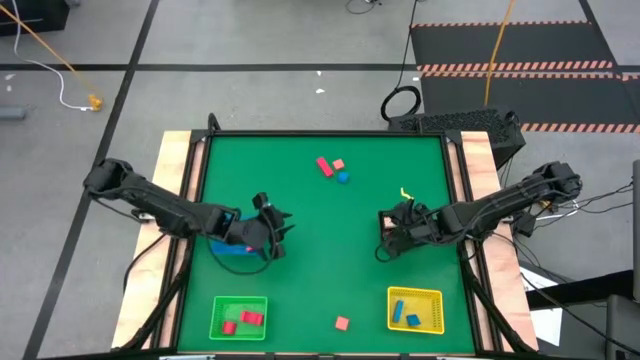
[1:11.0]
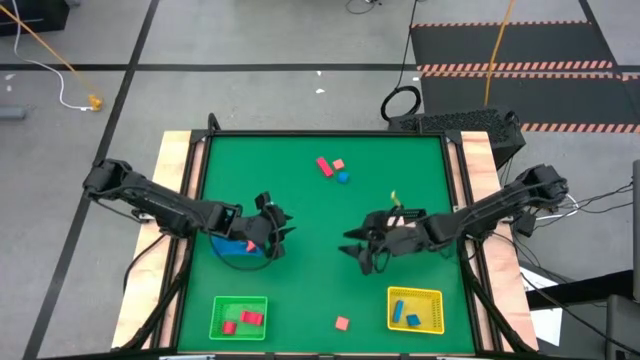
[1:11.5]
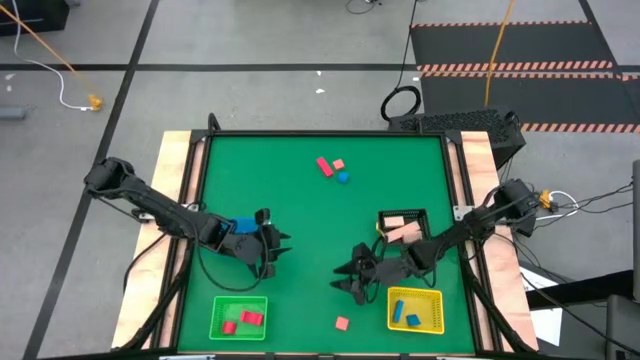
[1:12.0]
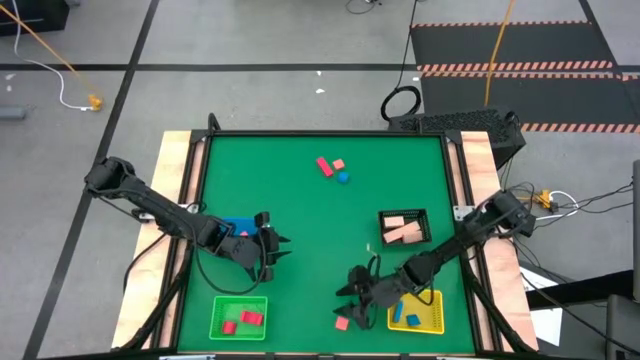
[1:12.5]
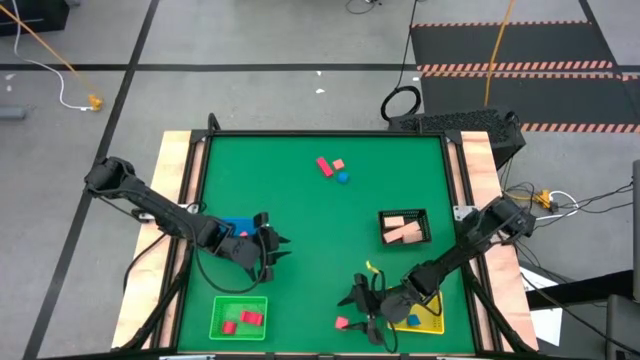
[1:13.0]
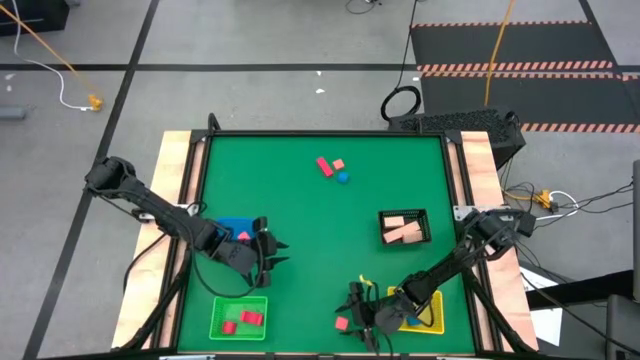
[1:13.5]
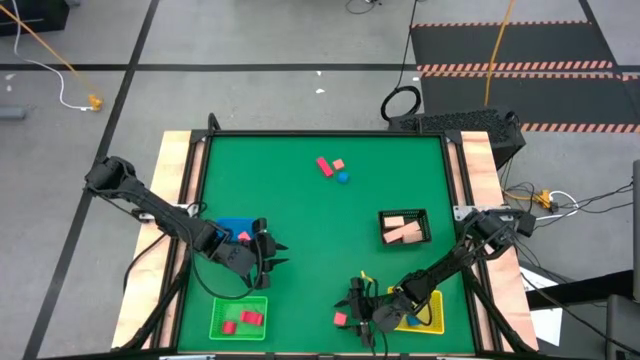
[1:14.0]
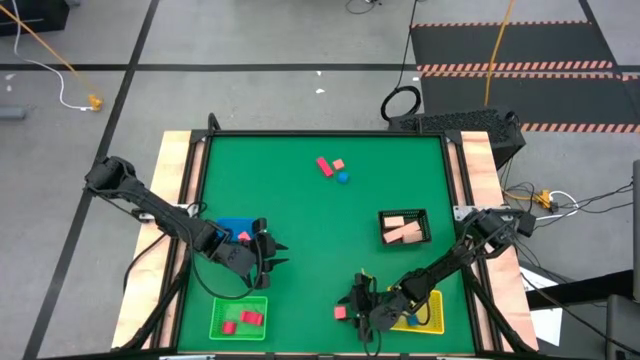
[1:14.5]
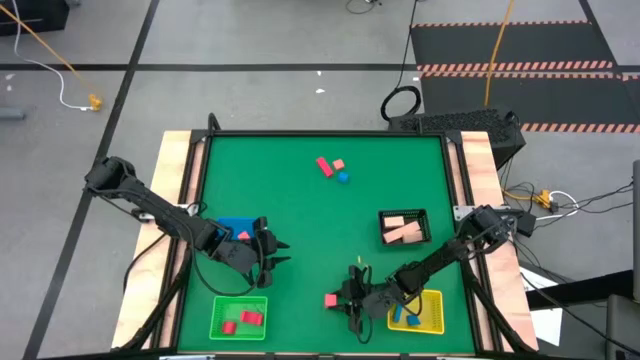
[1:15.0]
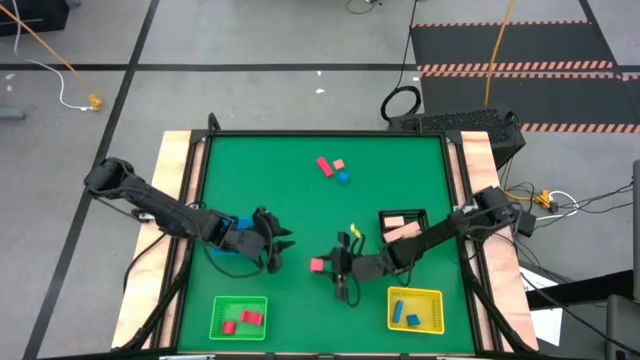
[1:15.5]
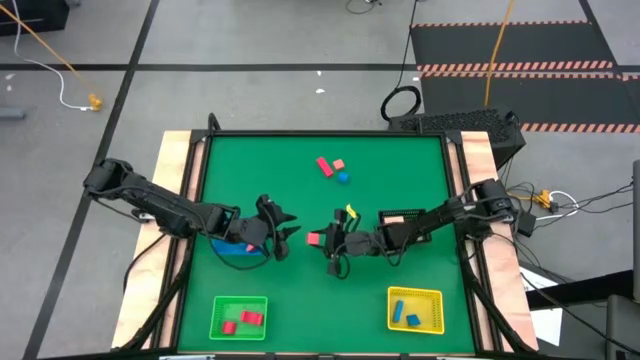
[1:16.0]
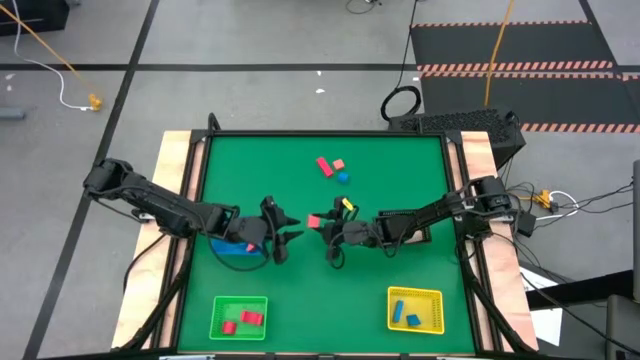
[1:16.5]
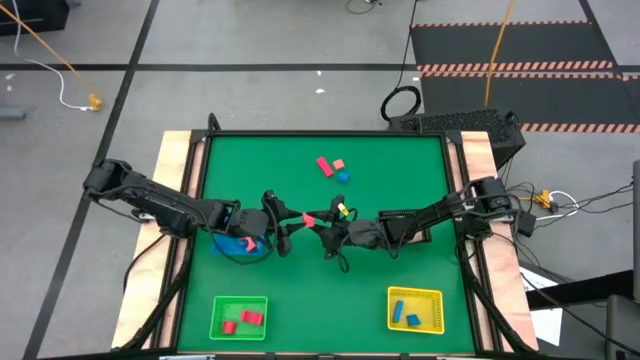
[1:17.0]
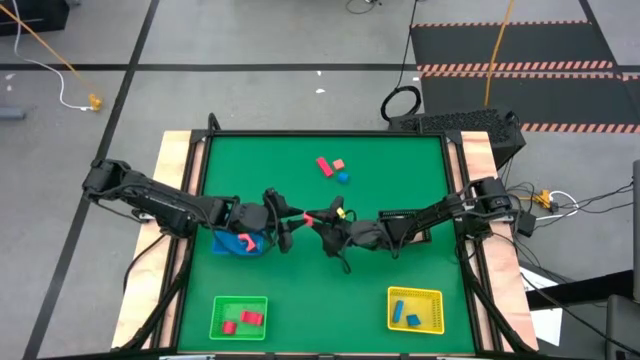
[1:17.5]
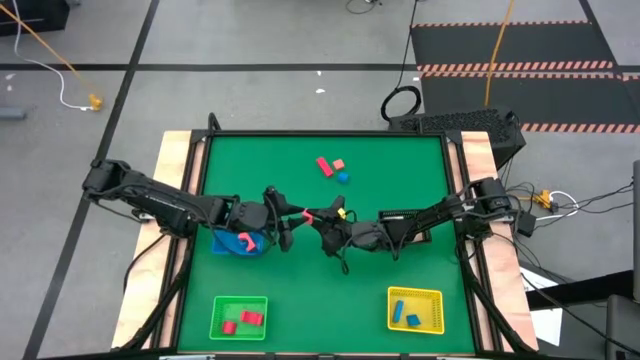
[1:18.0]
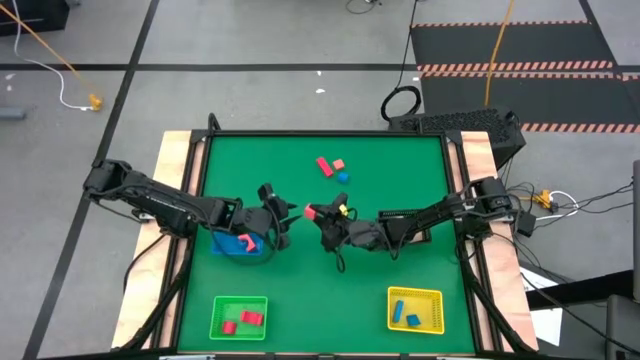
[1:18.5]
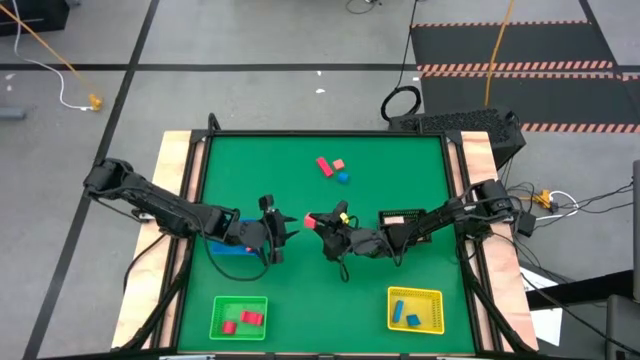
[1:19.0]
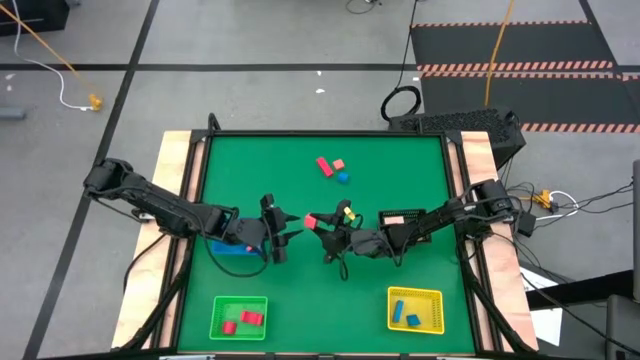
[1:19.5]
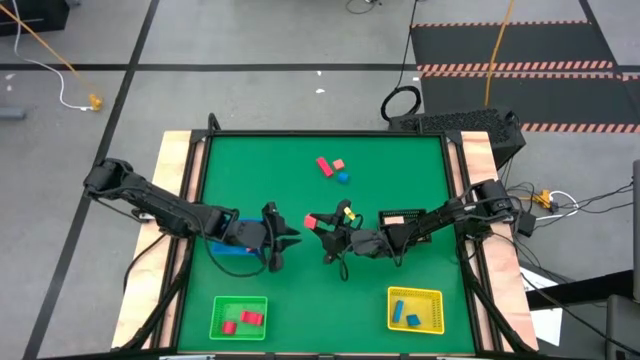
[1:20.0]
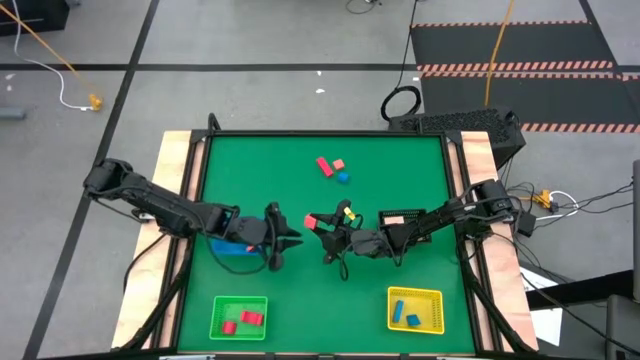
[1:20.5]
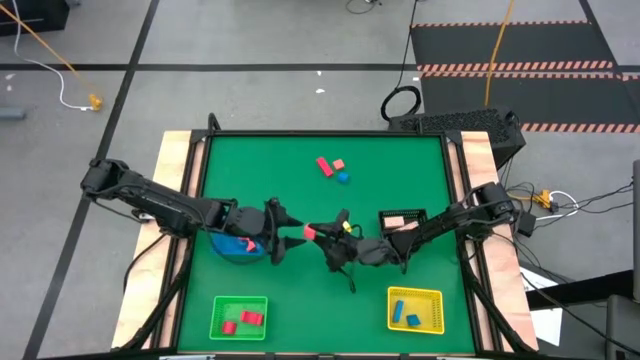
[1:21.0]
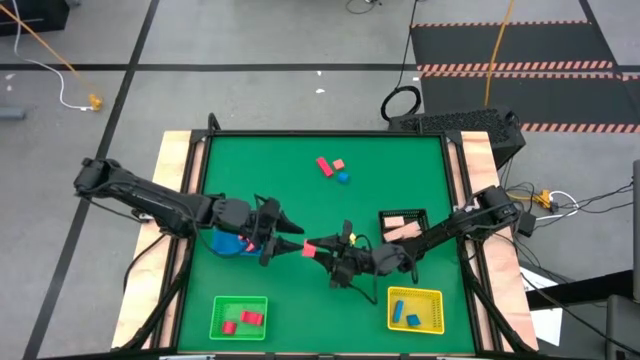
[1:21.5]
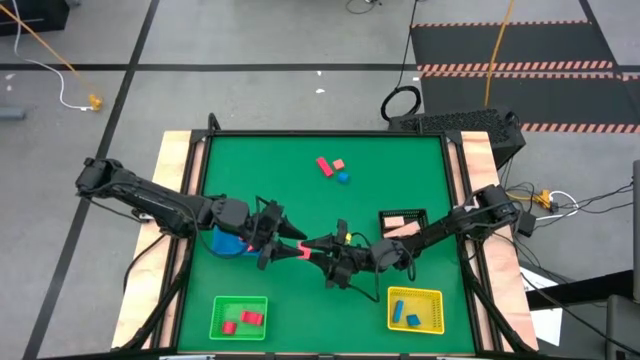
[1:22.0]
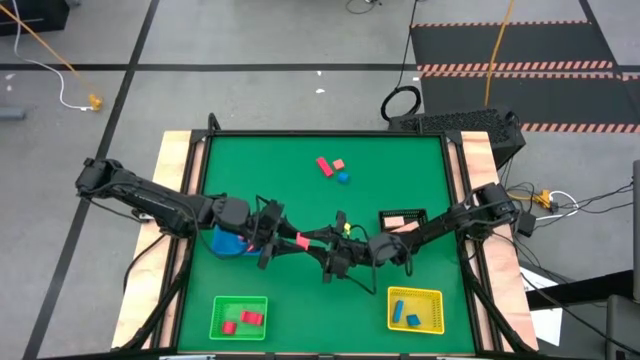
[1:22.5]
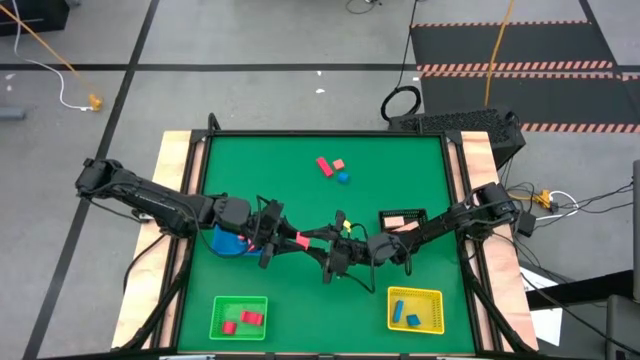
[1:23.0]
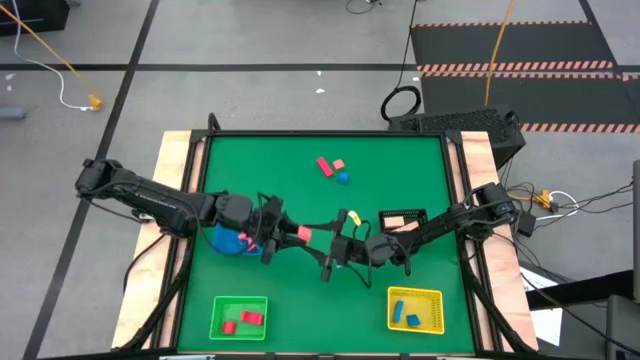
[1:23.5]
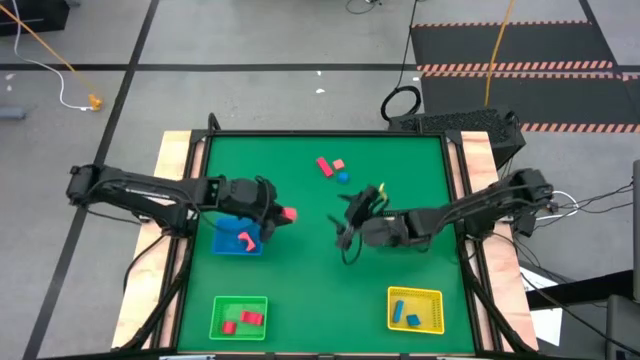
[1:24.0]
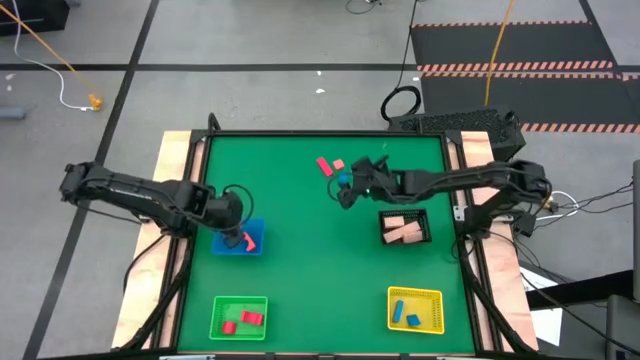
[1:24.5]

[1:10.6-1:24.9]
Task: Sort & place blocks by color
Put the bottom orange block into the blue bin

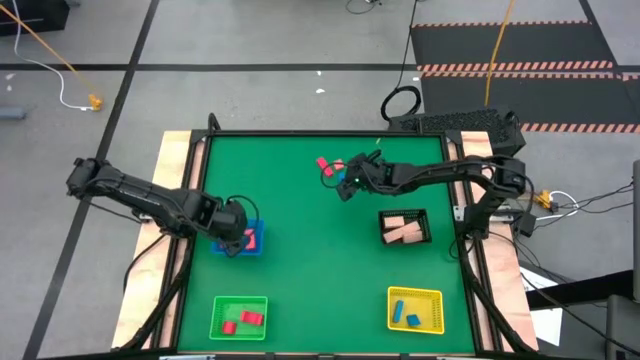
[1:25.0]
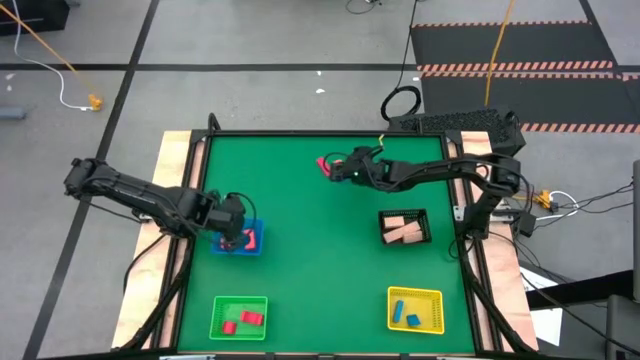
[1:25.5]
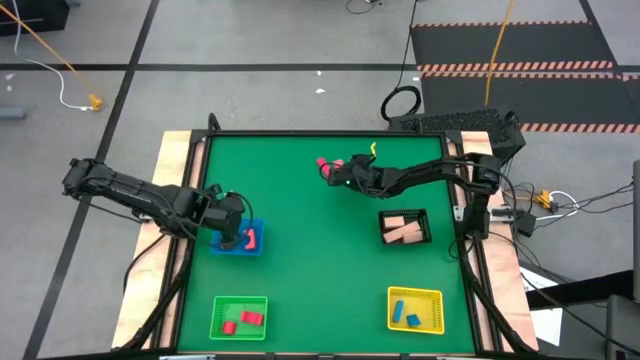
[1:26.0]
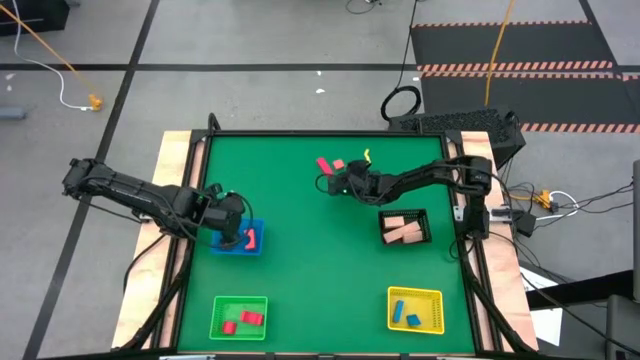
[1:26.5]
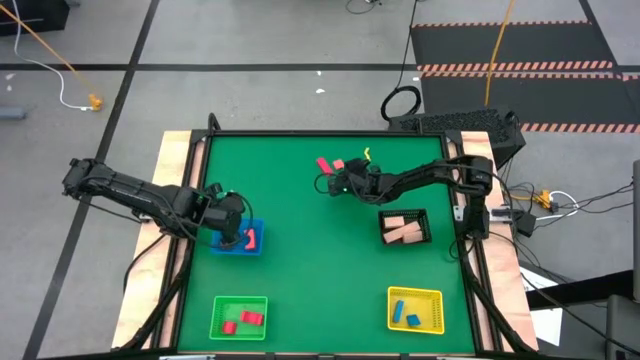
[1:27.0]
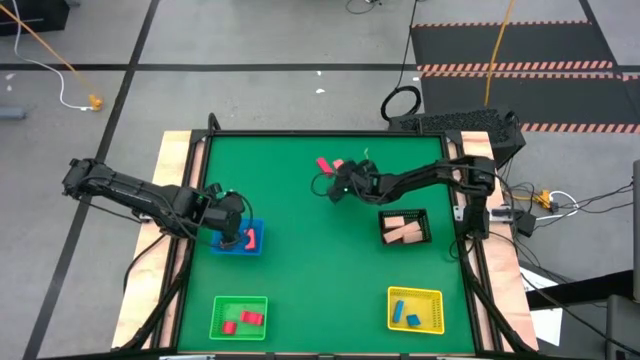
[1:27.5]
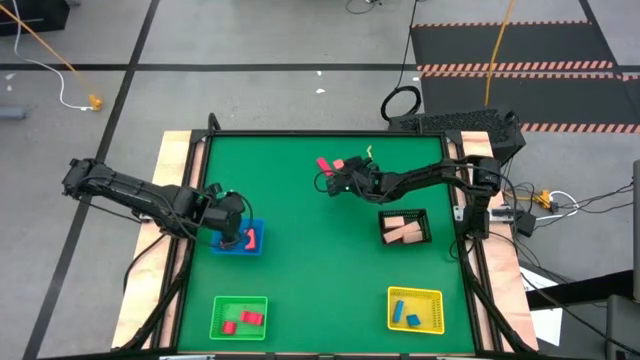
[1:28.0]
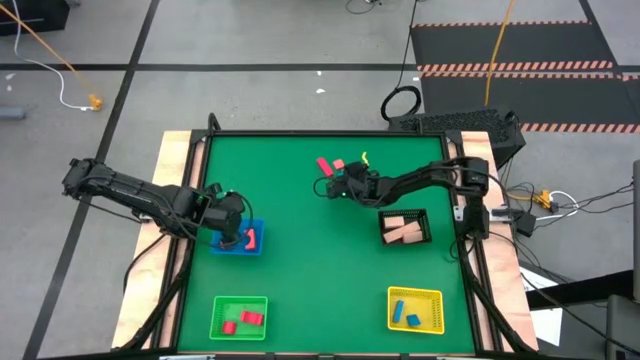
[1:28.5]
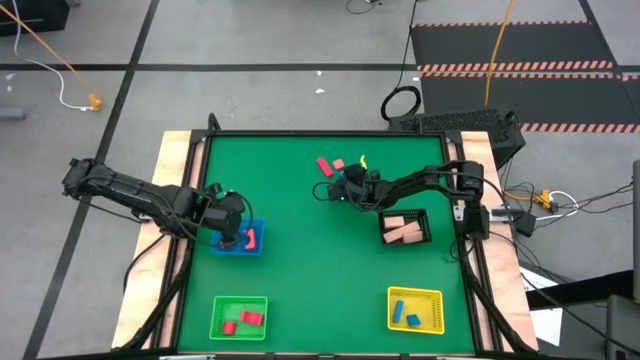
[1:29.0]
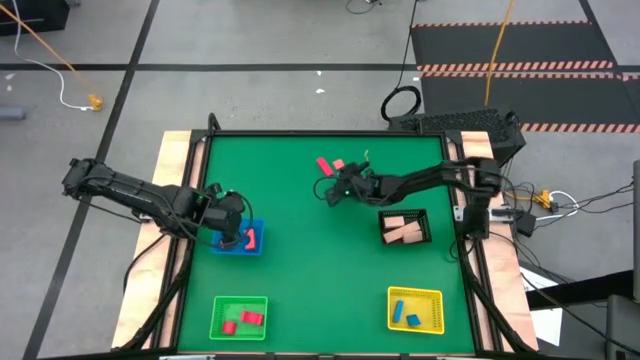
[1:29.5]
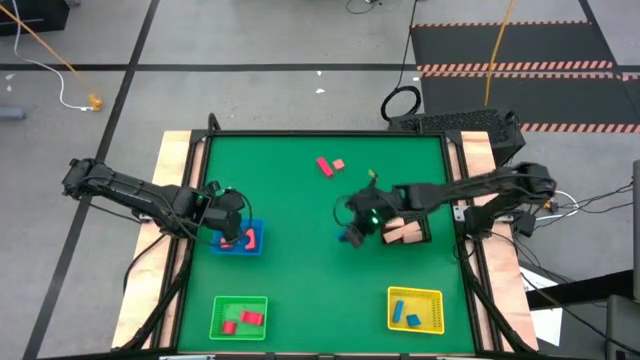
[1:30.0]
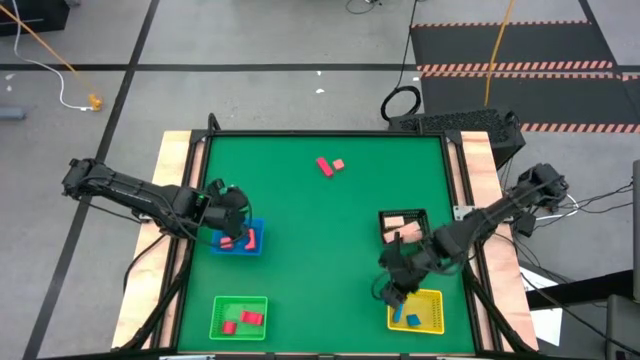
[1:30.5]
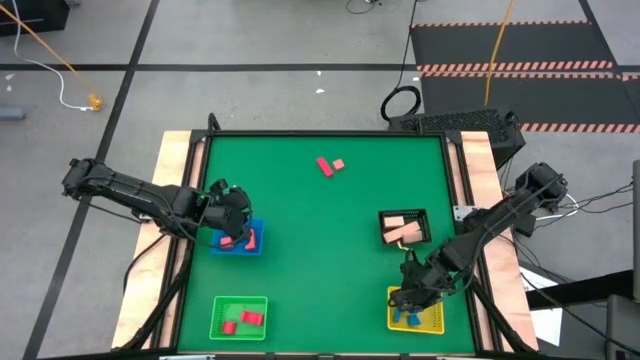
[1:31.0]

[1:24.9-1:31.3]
Put the blue block into the yellow bin

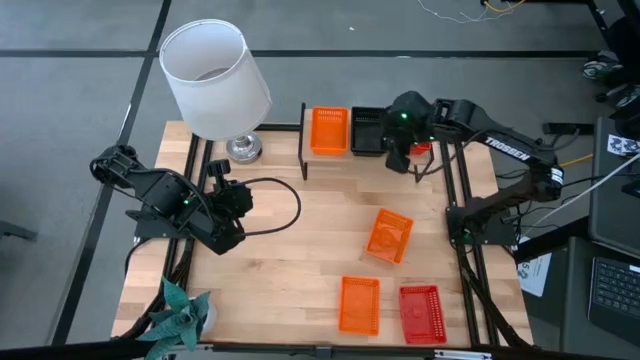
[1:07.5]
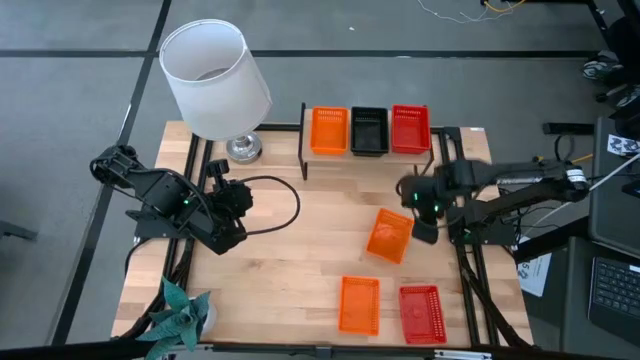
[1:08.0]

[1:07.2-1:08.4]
Task: Stack baskets on shelf by color
Adjust the orange bin
